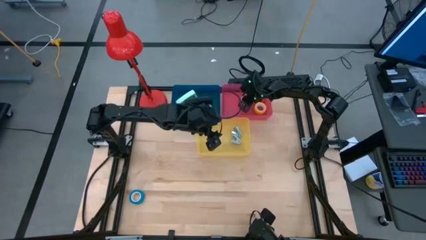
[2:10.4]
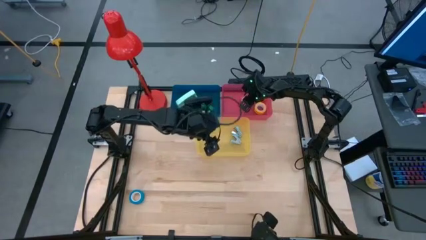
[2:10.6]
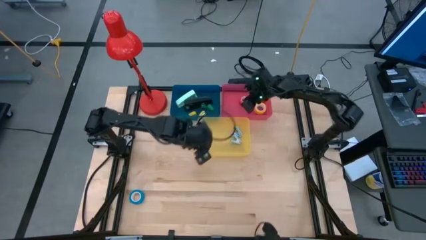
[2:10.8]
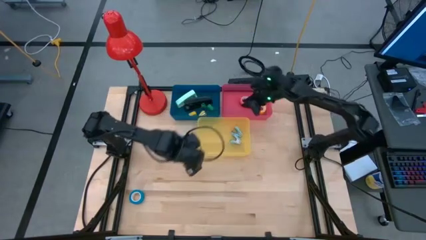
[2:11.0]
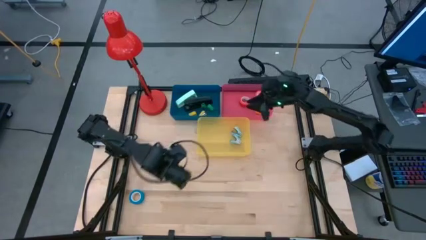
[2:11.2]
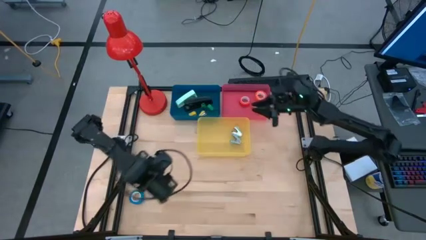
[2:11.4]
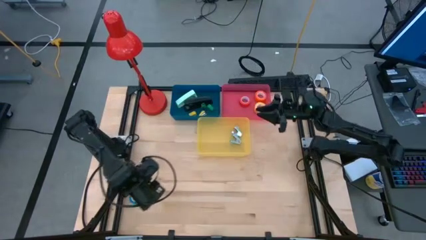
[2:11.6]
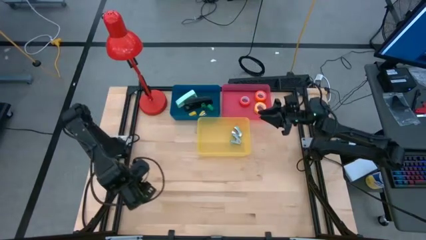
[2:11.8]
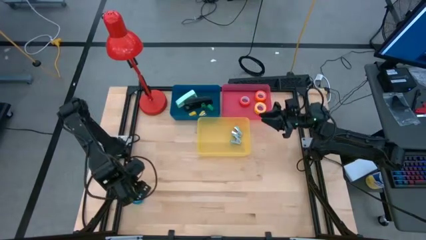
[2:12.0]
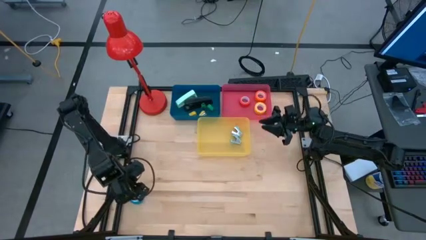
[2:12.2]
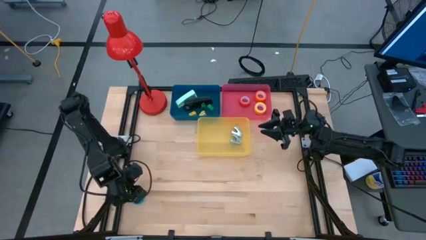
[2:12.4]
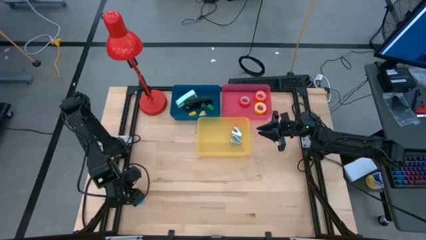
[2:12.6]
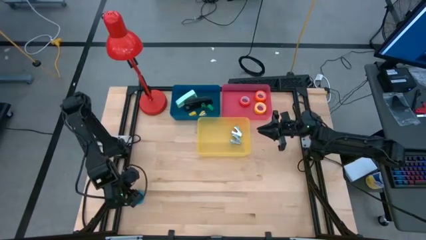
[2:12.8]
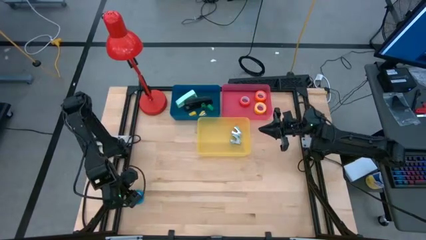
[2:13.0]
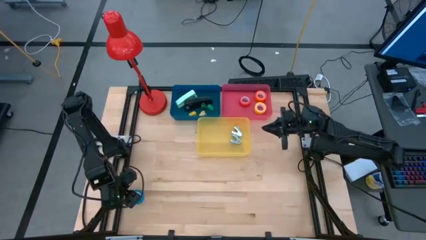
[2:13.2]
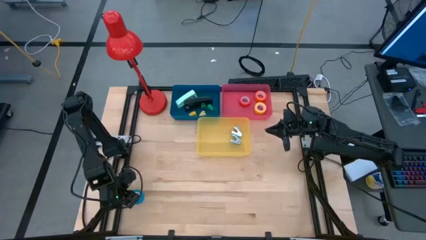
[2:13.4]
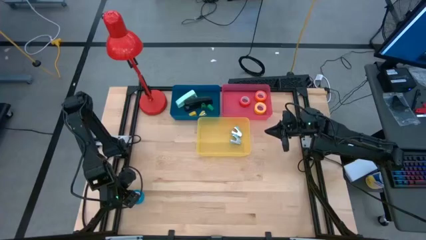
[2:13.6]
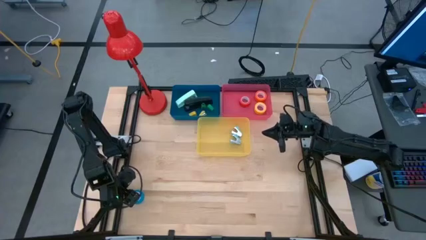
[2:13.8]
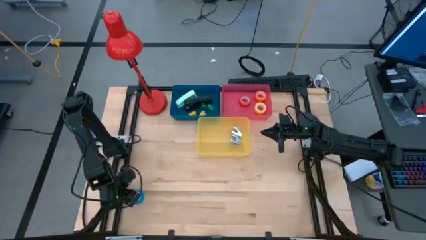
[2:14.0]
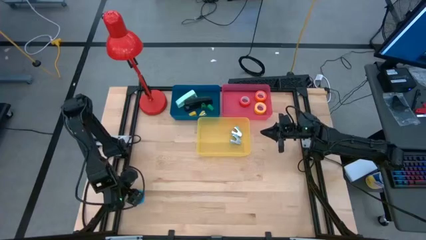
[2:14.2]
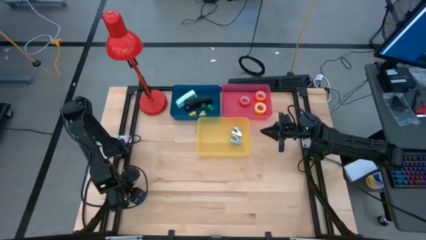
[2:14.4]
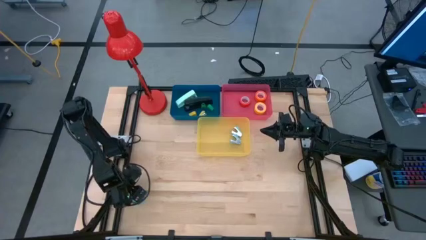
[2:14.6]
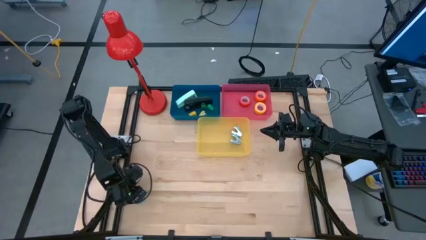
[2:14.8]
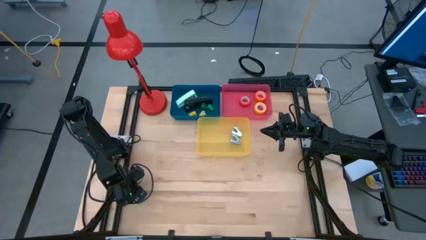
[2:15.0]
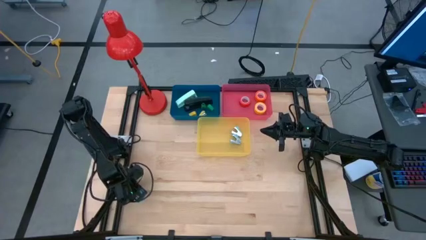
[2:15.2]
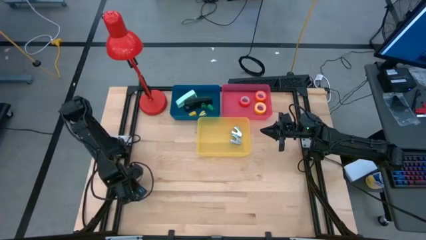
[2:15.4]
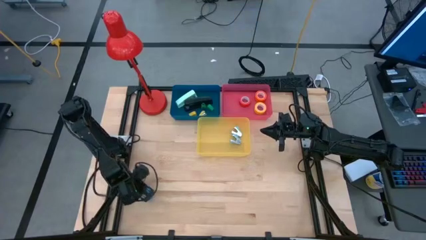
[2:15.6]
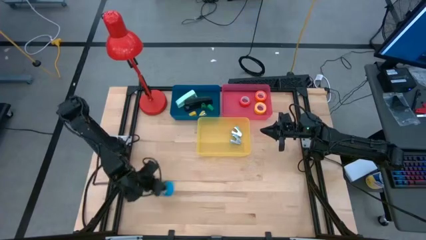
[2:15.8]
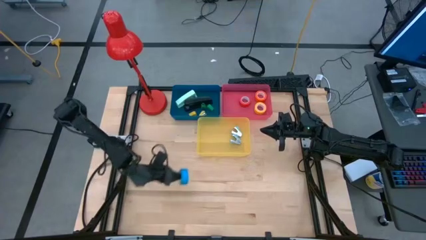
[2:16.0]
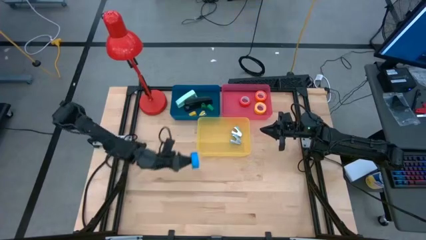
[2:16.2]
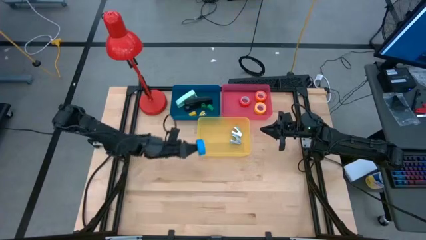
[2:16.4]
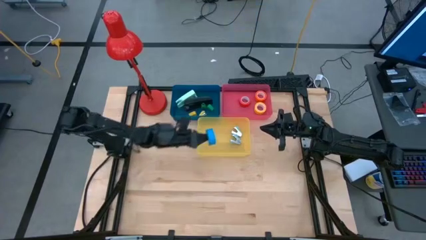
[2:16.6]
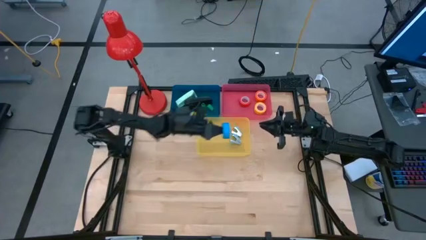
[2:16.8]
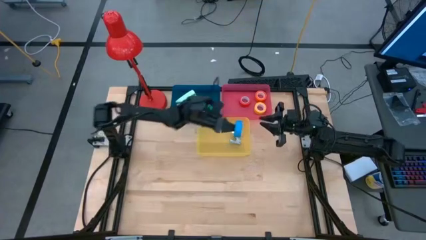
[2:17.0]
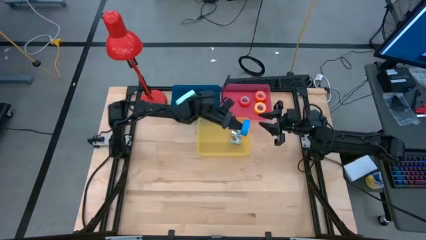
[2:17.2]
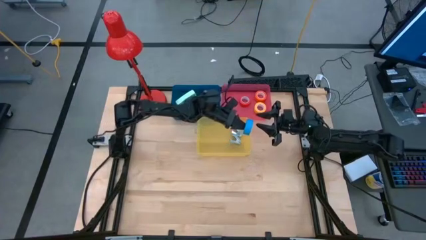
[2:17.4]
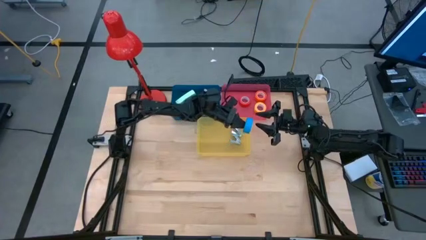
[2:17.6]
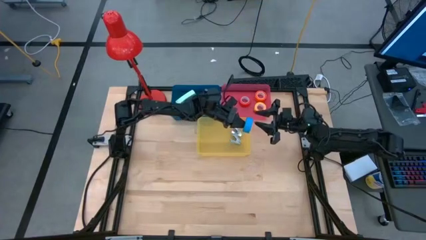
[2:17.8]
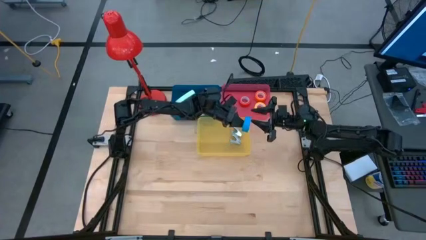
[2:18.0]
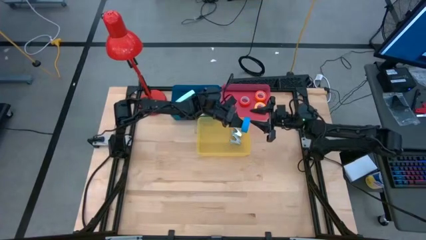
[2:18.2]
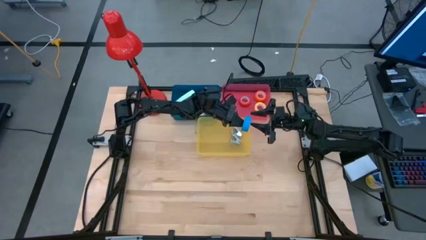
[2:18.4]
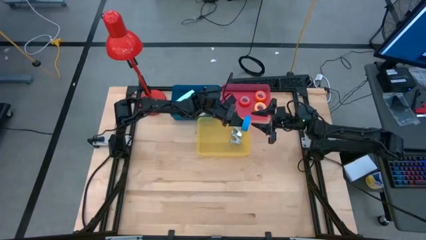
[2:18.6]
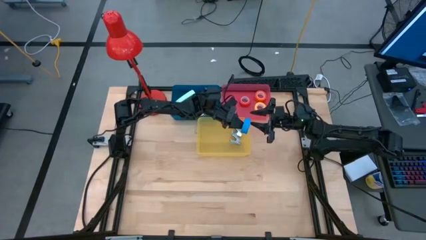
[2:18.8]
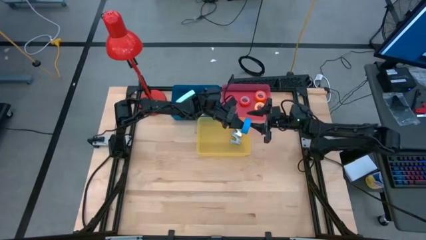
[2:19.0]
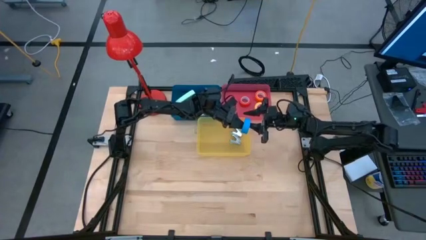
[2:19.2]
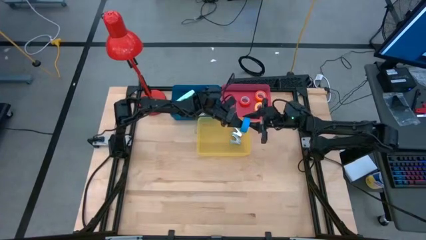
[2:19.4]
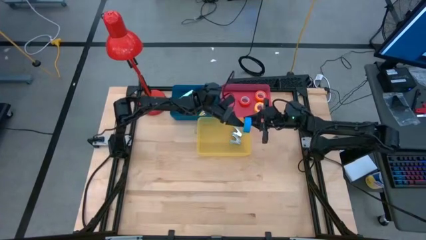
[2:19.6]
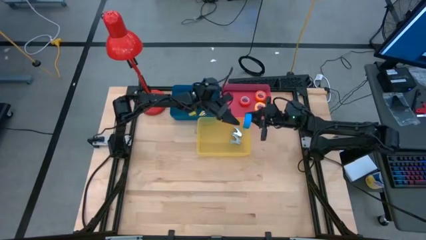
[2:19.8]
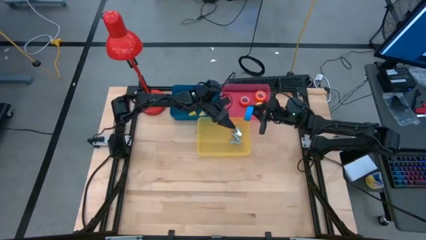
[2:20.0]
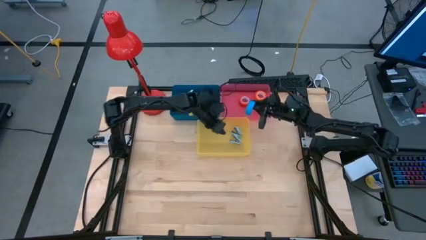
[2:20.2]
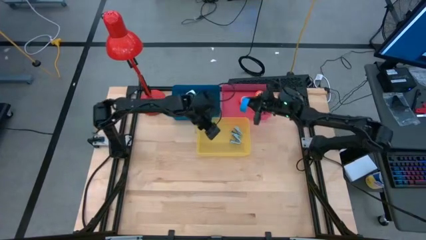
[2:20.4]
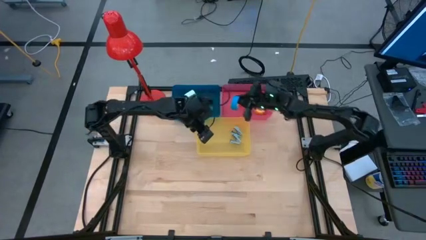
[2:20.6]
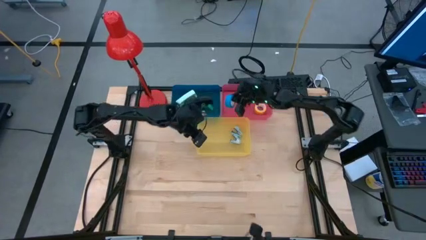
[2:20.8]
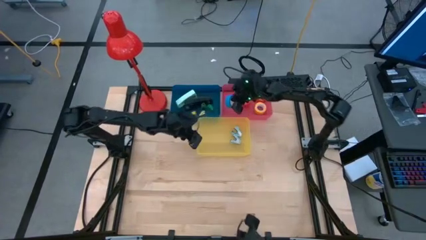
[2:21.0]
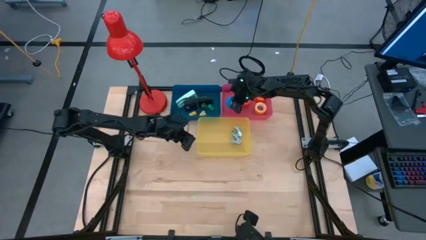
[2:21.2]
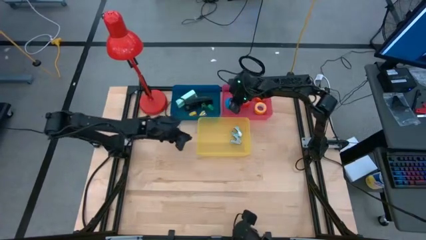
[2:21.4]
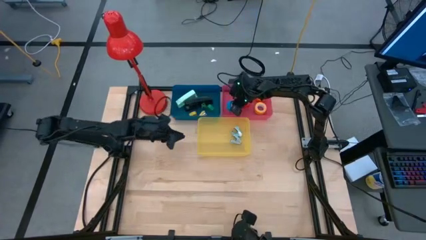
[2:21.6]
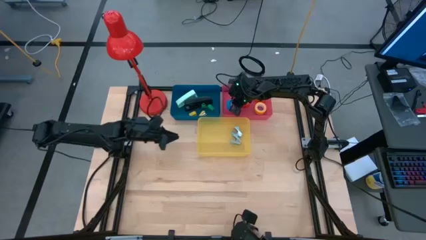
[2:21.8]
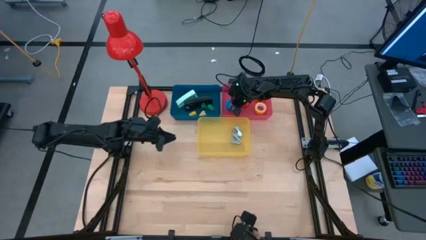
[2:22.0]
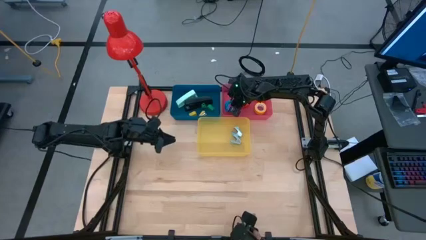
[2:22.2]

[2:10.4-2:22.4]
Task: Pick and place Stapler, Stapler remover, tape
Put the blue tape into the red bin

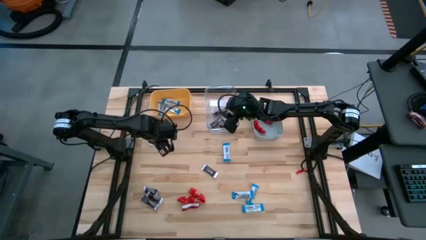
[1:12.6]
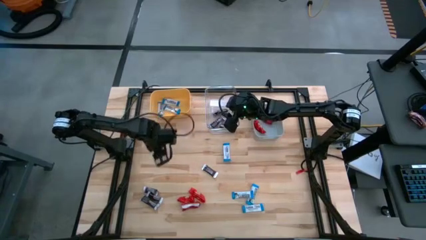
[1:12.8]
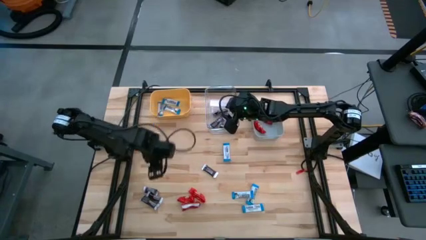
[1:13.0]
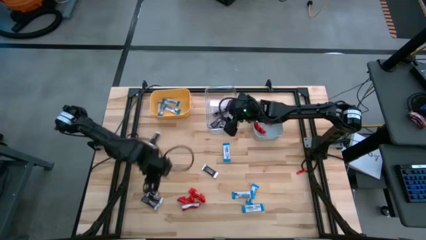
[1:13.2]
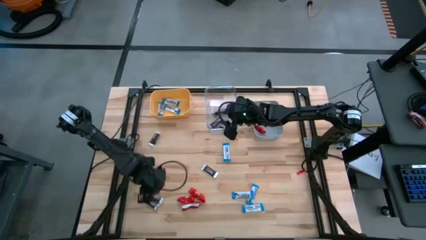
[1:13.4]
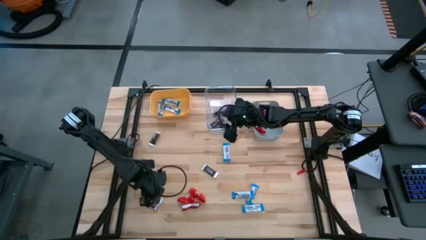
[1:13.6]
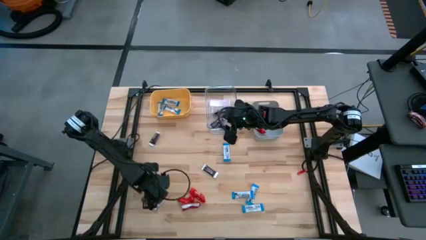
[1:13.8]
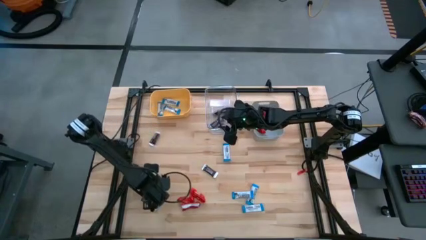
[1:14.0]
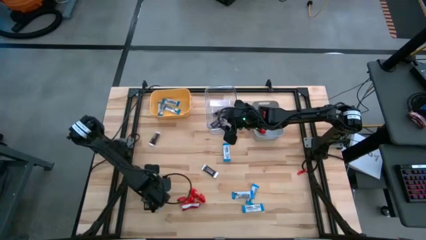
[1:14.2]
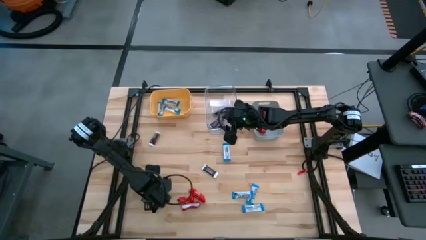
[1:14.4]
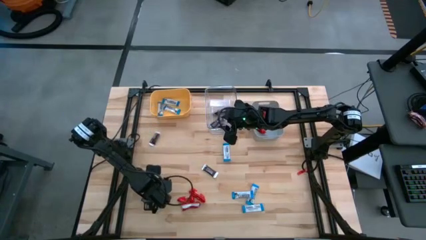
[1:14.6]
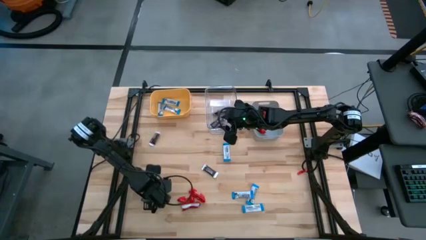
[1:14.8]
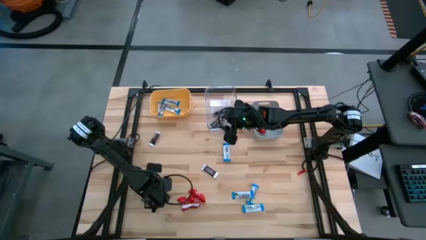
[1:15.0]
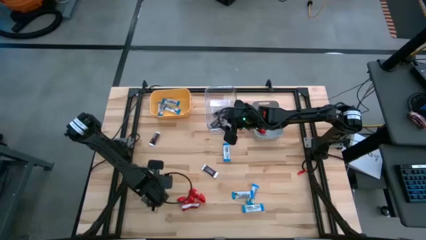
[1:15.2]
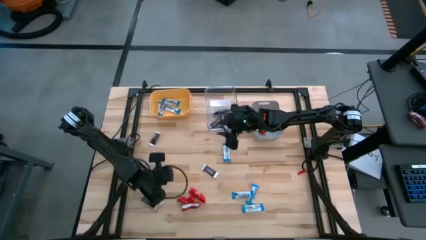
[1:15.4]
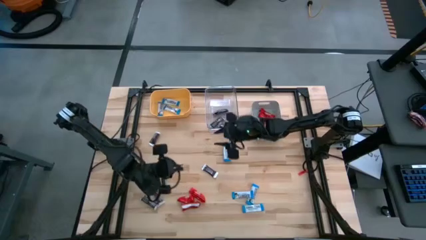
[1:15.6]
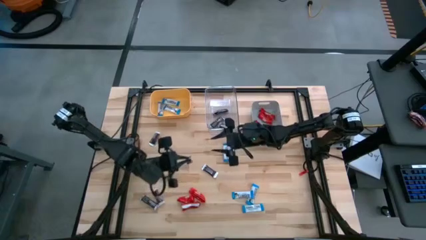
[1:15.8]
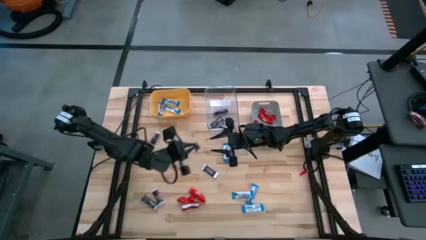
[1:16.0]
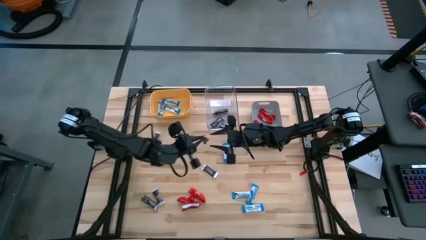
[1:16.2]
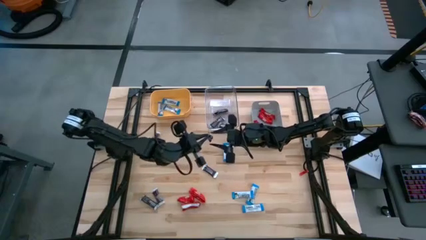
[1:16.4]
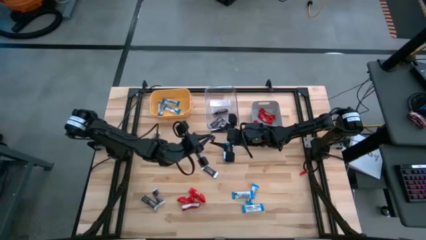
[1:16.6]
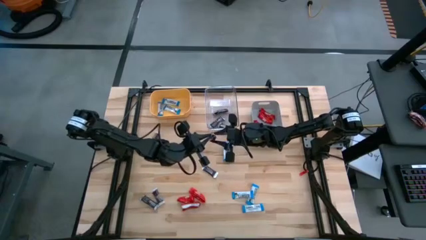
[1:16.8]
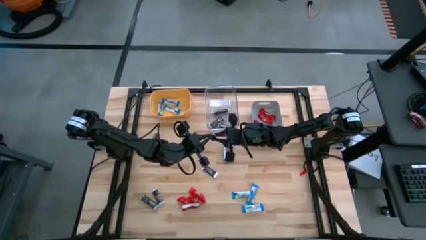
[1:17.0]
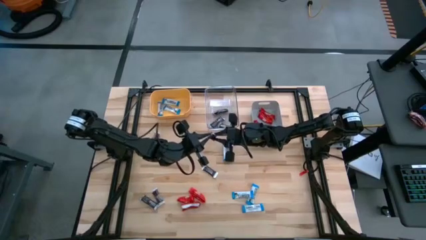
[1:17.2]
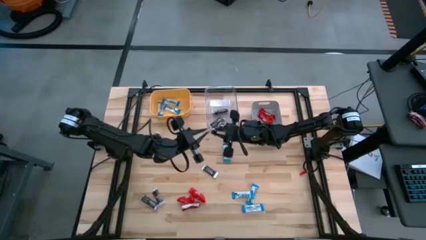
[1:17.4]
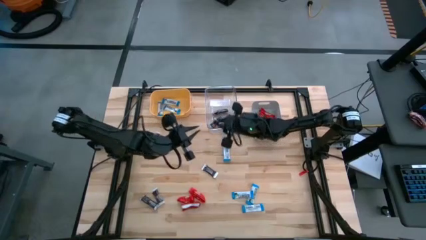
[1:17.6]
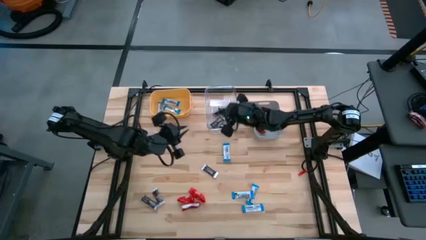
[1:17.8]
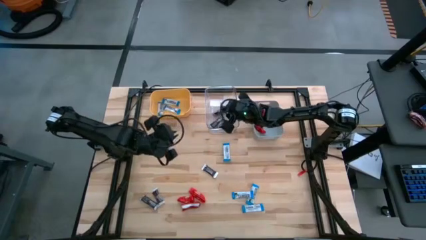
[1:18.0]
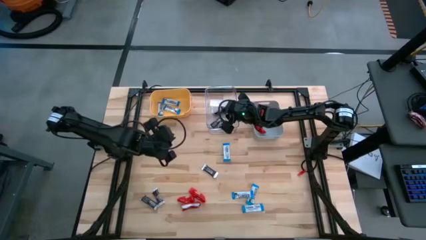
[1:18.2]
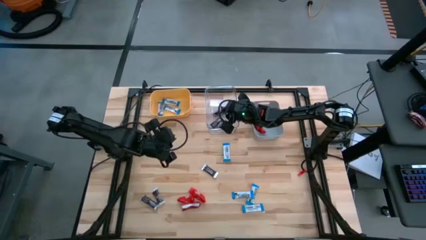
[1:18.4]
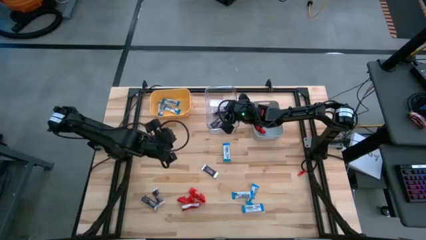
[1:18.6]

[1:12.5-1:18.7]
Task: Sort candy
Put the brown chocolate into the transparent bin
